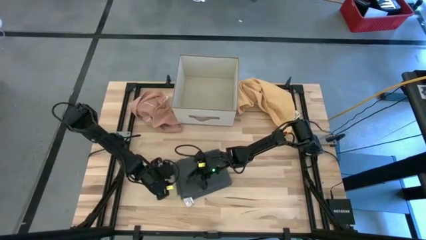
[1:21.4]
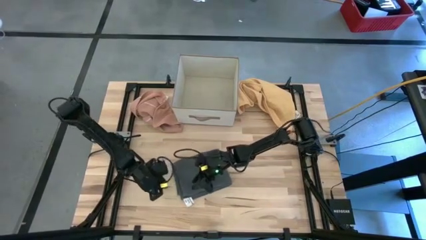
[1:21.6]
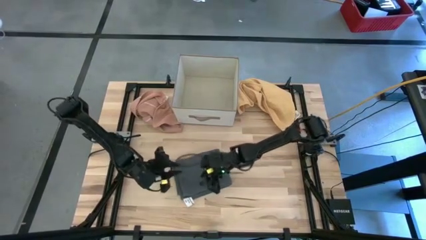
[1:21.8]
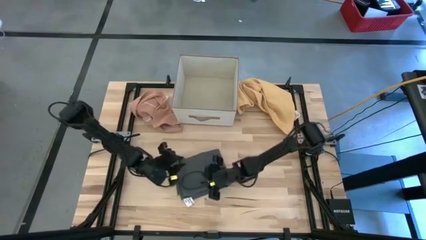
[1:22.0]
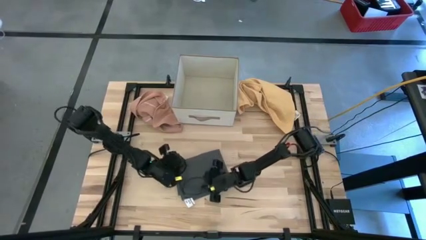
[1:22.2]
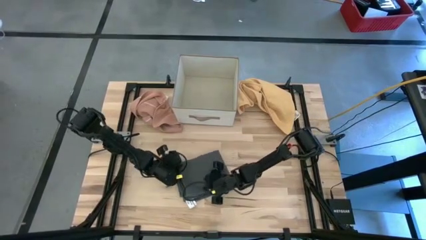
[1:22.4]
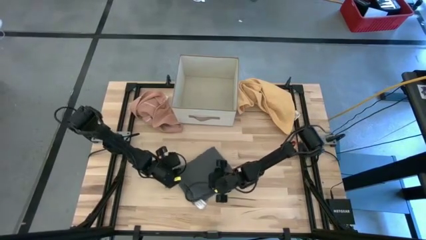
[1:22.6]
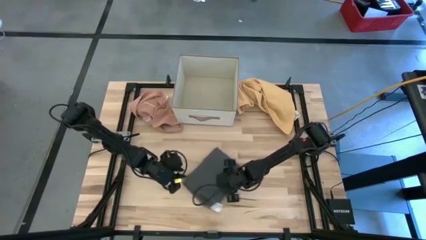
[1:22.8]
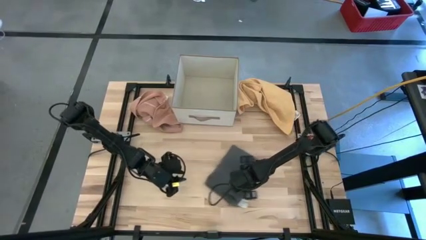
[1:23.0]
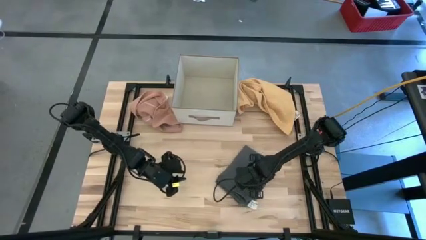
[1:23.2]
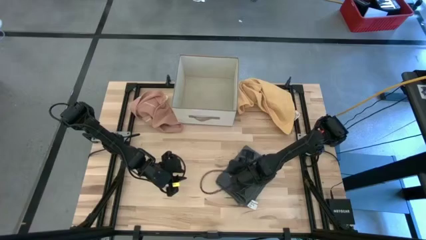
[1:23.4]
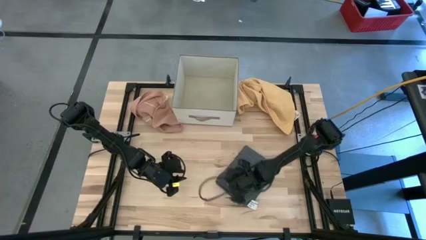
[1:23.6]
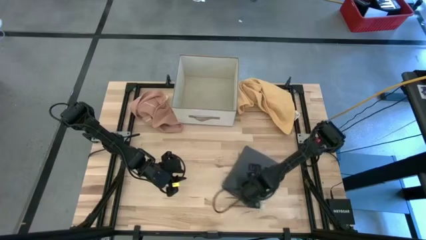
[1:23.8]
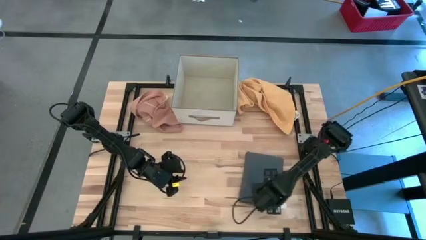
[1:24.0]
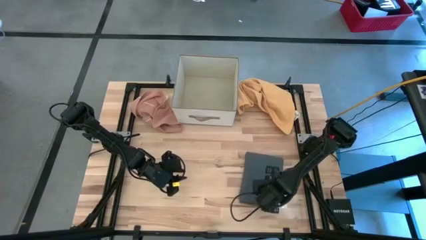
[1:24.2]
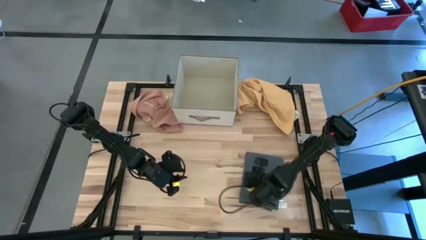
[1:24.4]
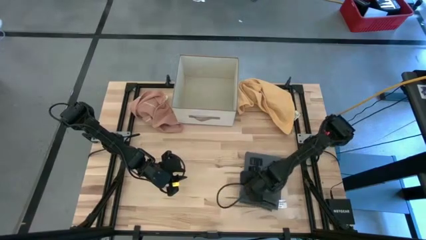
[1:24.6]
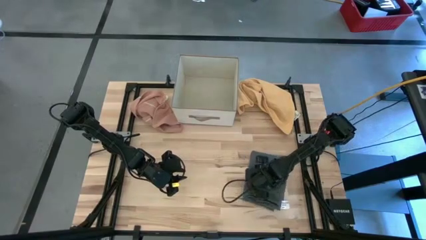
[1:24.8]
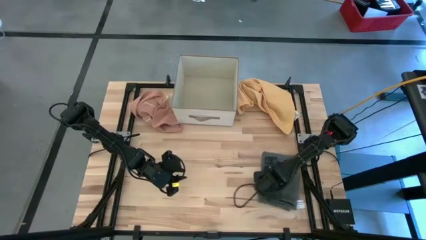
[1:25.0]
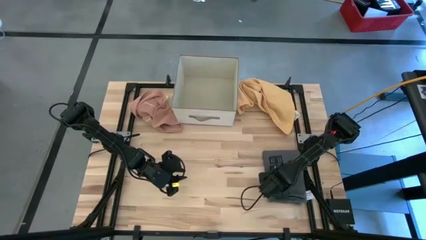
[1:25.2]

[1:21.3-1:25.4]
Task: Fold towel
Move the dark gray towel to the middle right of the table

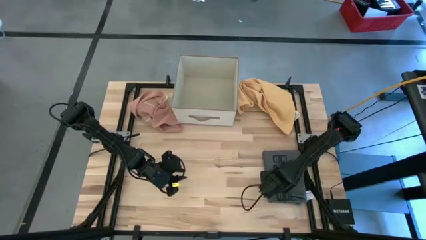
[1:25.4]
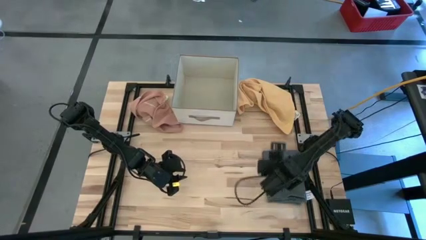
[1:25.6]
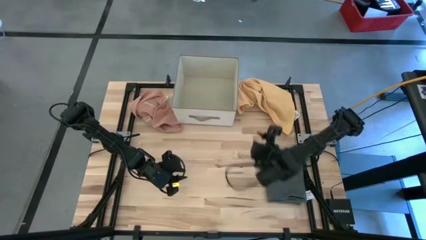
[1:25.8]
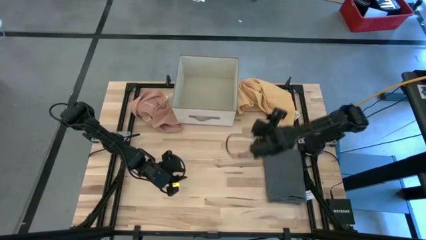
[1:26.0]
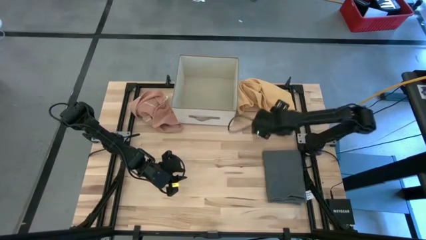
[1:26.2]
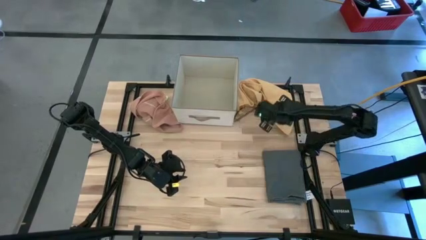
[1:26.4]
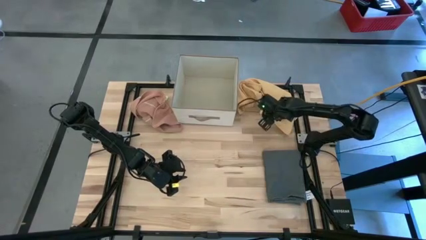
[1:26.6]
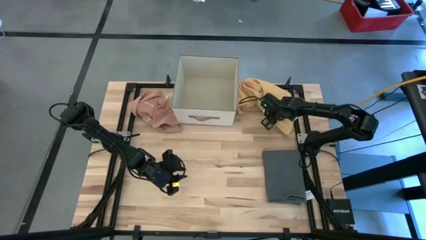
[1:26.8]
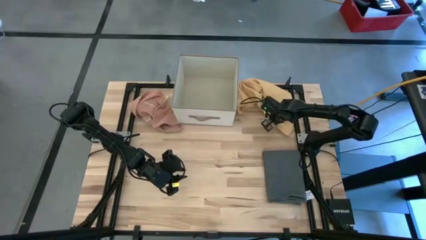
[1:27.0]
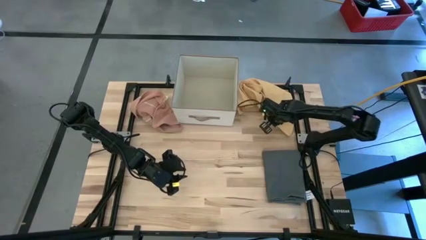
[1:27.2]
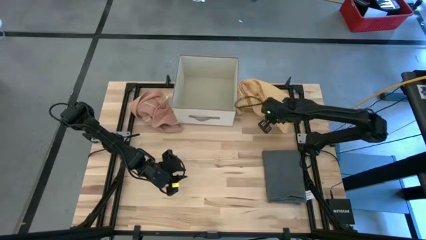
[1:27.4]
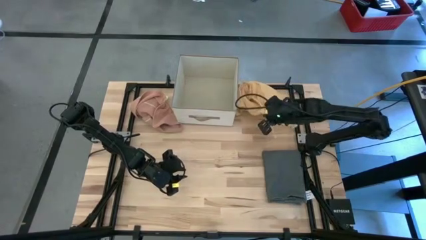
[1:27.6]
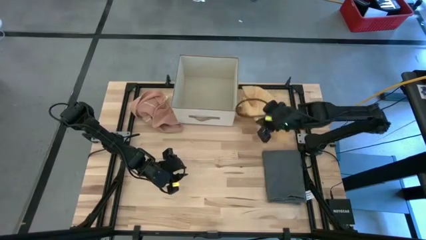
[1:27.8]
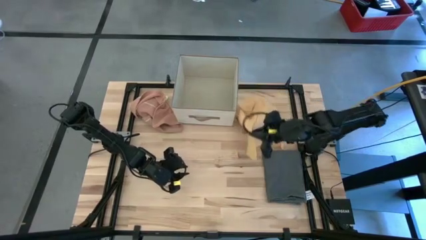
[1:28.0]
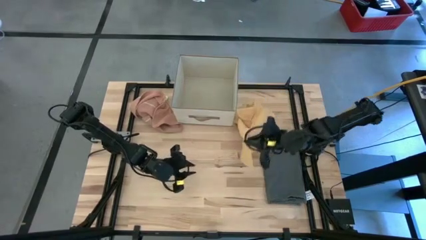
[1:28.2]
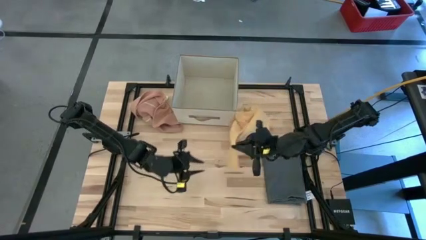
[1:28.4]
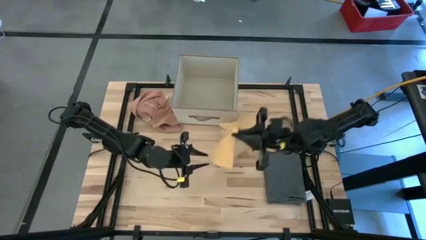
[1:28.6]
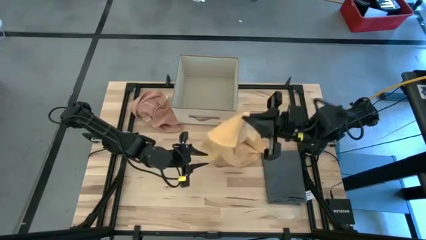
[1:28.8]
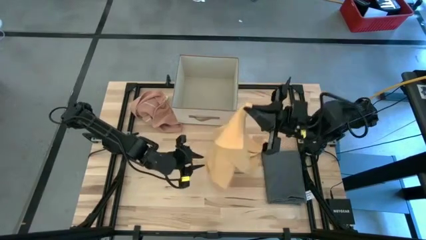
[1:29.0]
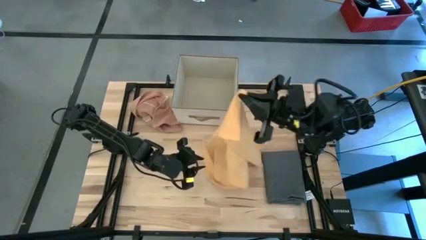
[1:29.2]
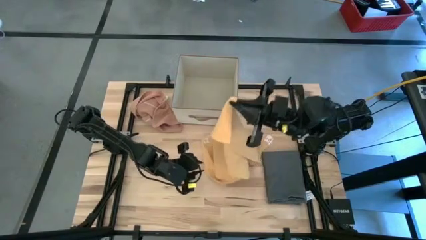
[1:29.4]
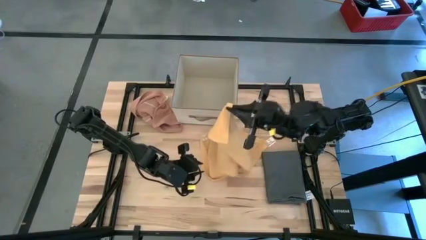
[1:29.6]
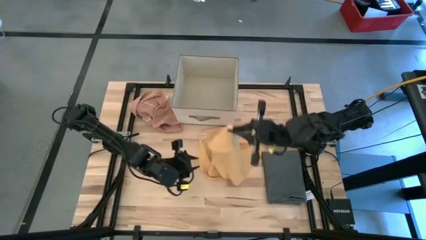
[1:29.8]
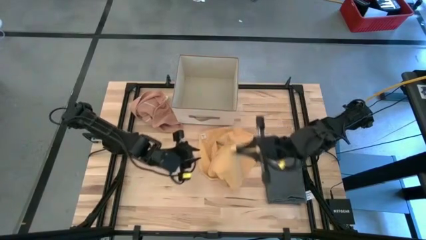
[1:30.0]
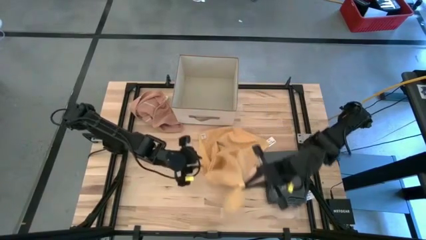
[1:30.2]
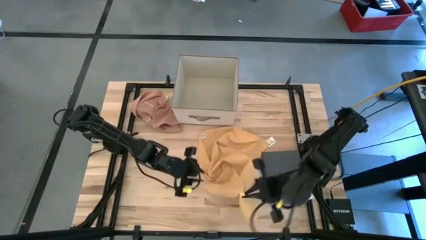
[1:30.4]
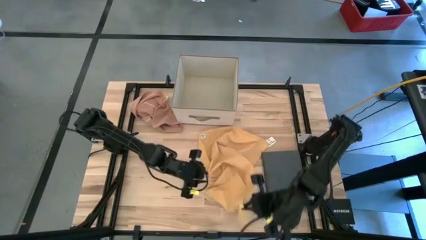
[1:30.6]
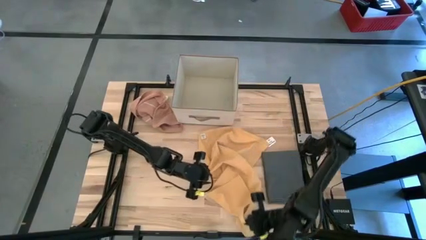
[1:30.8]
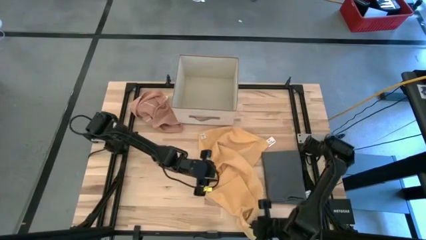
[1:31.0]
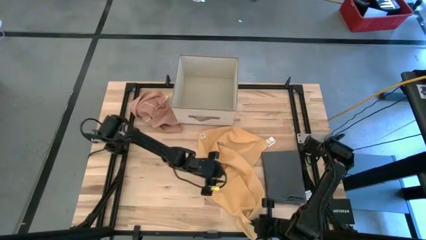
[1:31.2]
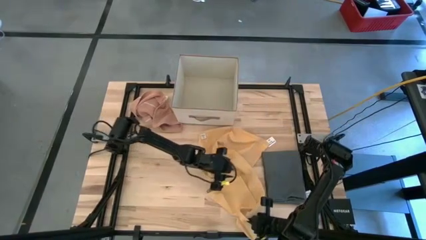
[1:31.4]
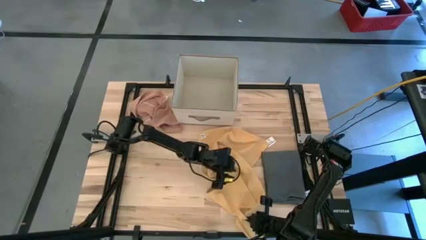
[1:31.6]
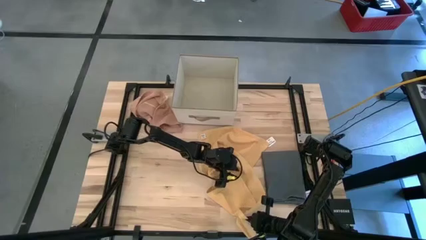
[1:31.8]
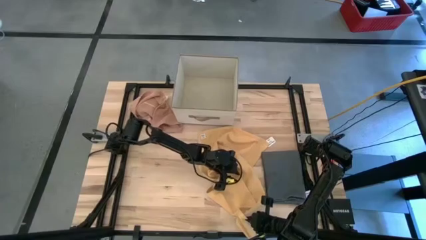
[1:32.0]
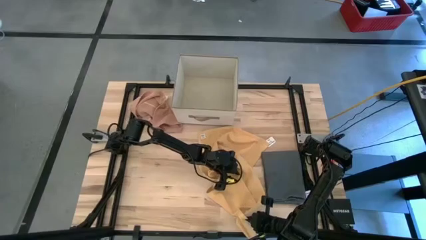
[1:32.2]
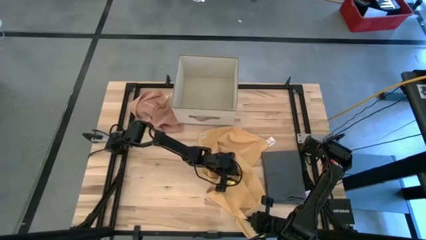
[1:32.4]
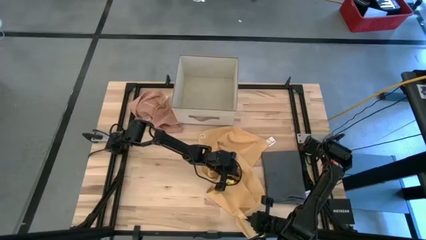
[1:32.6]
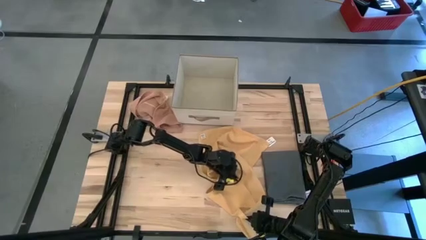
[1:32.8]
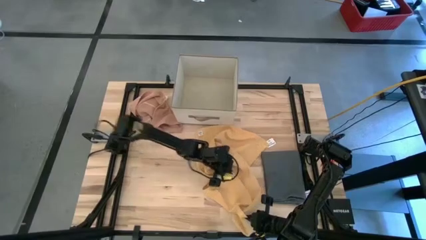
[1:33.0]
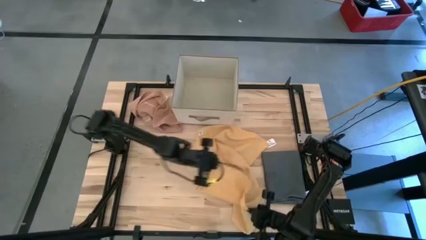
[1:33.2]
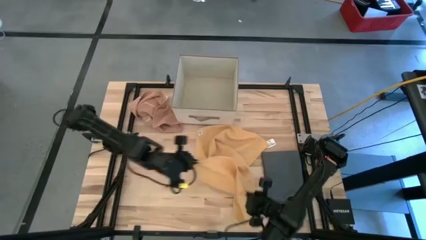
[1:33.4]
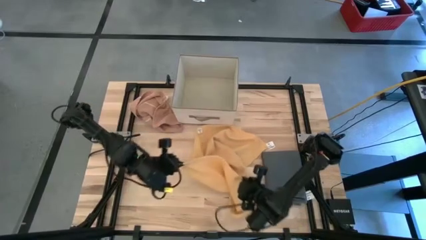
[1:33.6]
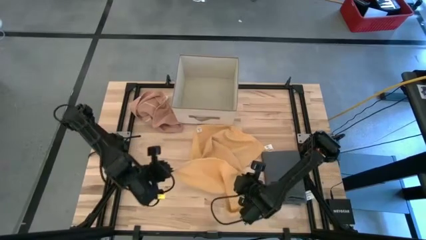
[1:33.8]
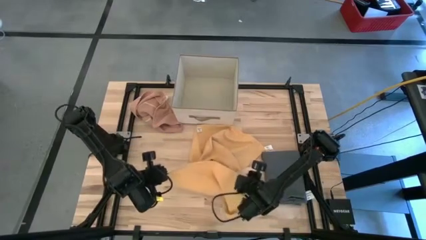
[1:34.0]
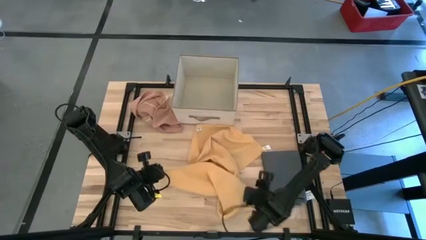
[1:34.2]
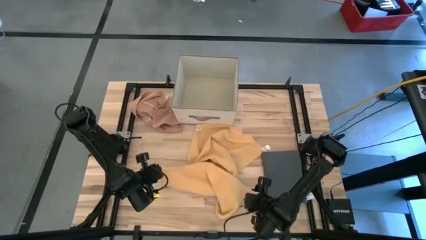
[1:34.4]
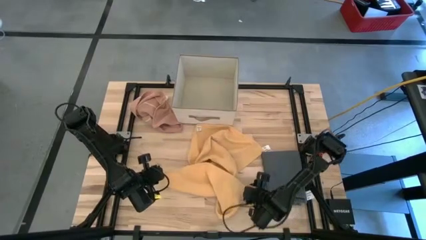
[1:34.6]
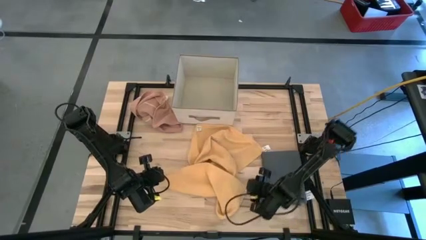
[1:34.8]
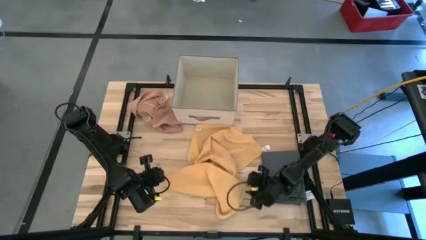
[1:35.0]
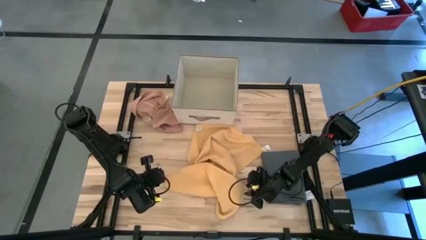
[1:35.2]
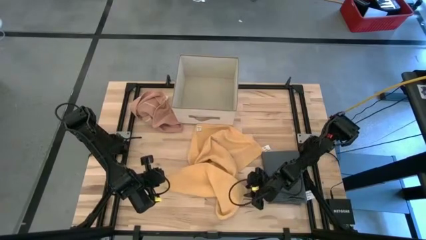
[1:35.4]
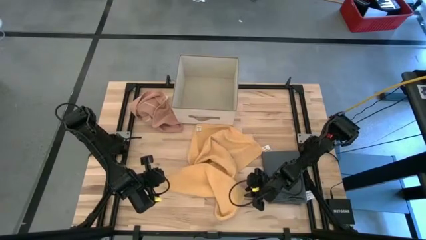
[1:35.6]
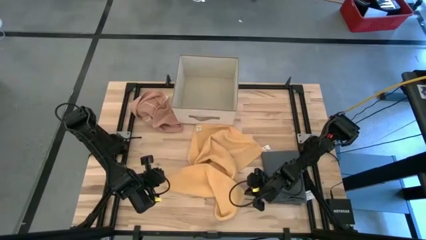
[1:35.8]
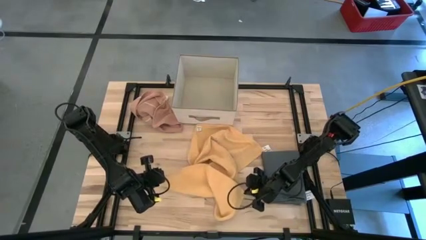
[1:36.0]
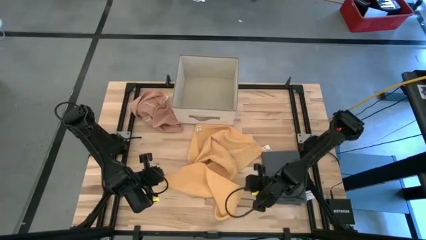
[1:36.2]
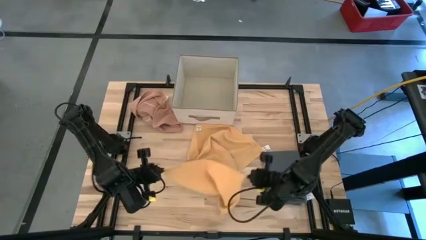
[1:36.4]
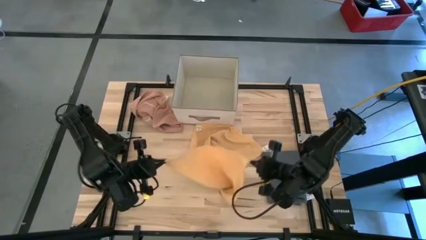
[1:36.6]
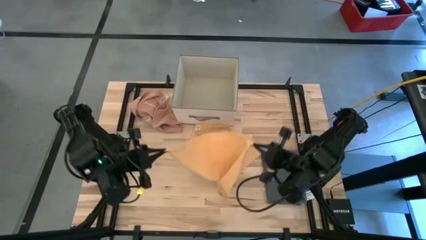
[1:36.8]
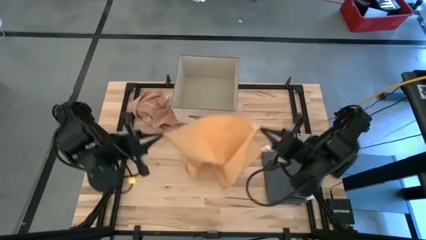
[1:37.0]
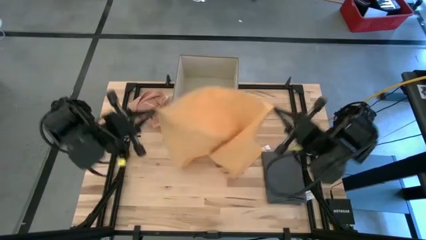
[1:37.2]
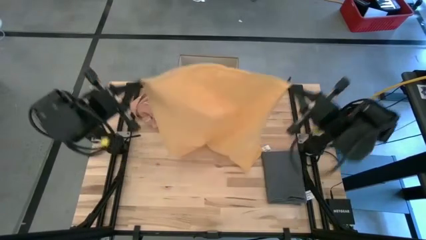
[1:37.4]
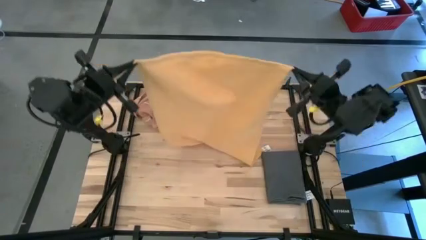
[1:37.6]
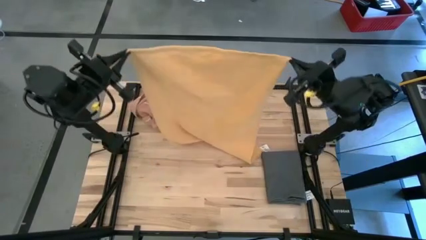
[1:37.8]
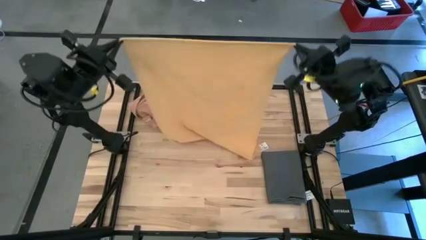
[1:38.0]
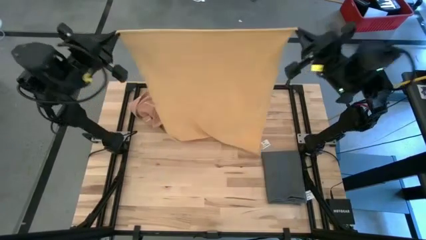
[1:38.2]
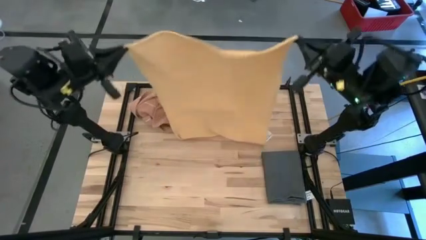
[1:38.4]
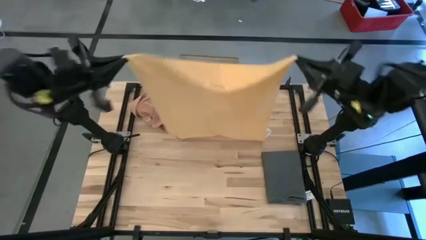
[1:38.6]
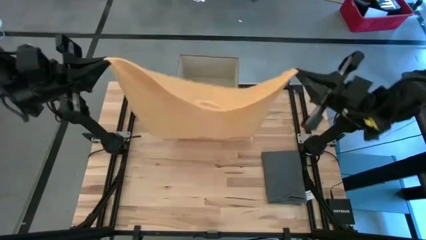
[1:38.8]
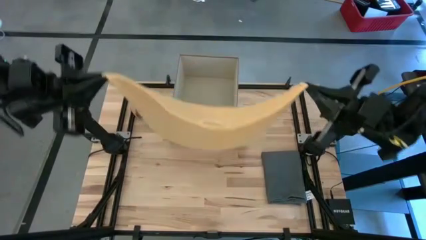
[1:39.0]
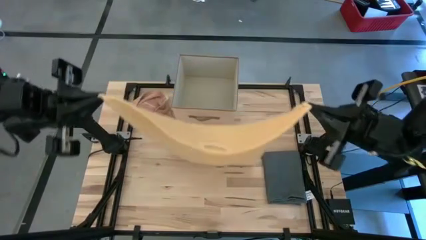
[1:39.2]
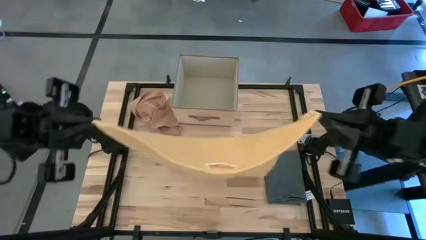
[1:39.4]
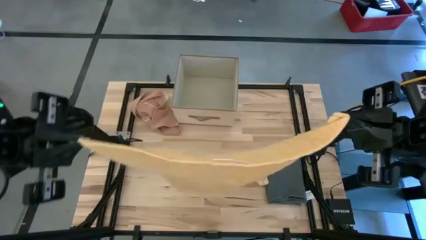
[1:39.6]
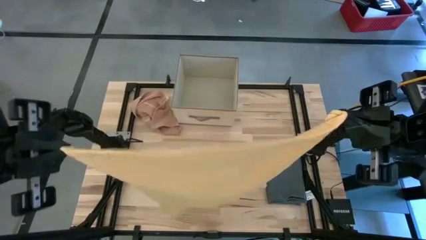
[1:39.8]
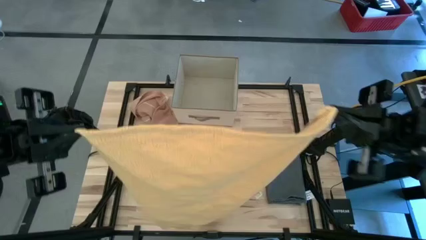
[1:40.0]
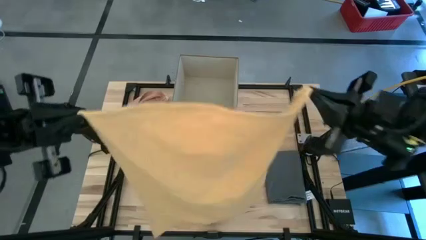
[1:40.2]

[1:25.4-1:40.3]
Fold the yellow towel
